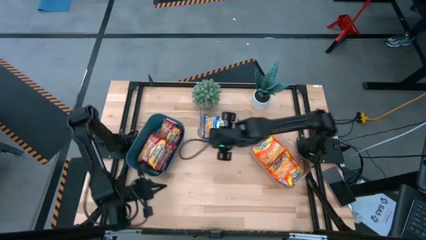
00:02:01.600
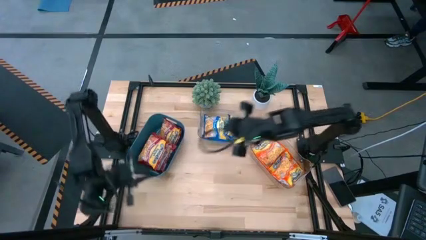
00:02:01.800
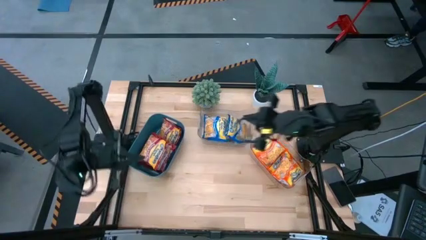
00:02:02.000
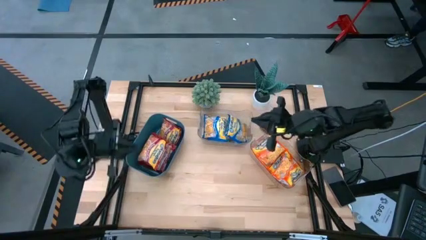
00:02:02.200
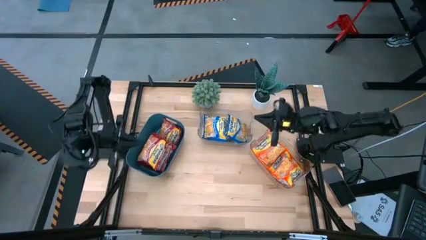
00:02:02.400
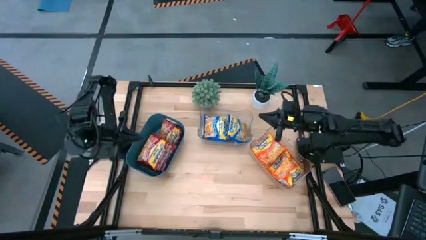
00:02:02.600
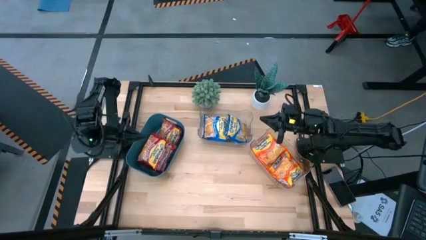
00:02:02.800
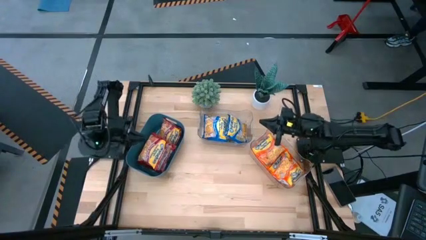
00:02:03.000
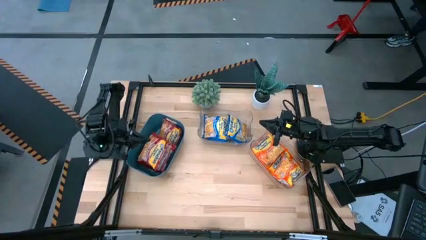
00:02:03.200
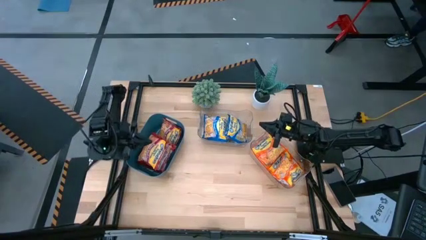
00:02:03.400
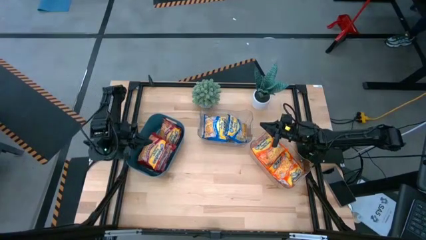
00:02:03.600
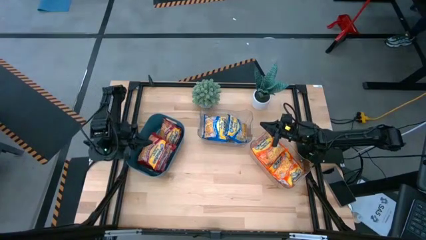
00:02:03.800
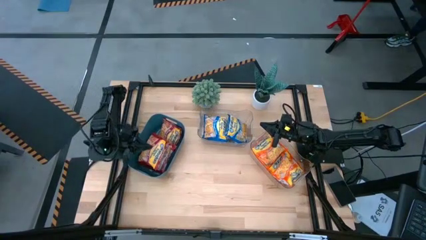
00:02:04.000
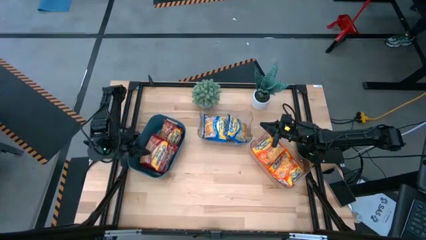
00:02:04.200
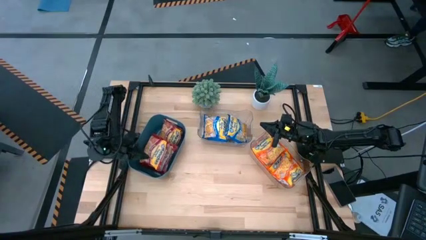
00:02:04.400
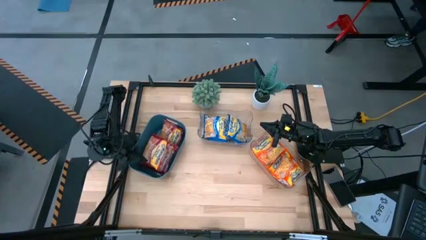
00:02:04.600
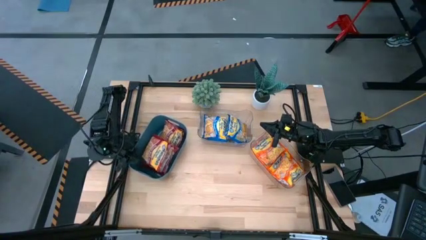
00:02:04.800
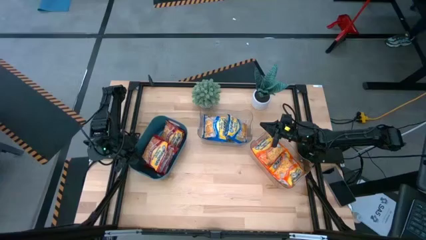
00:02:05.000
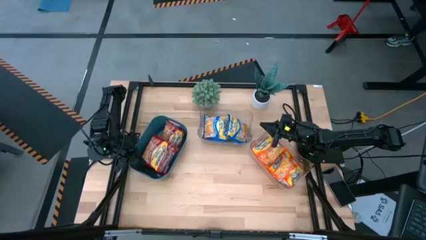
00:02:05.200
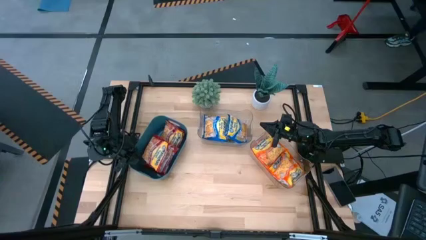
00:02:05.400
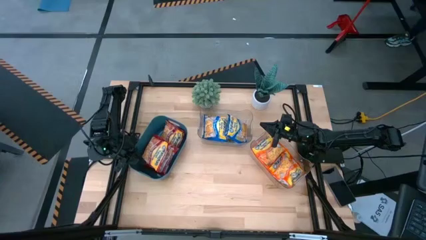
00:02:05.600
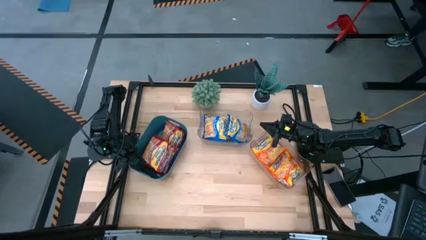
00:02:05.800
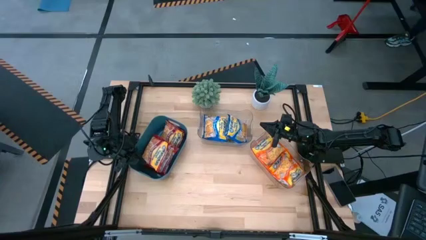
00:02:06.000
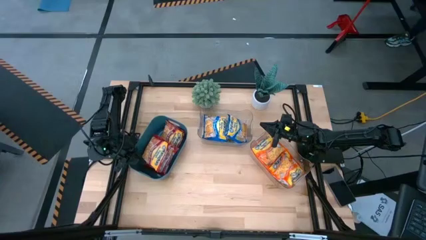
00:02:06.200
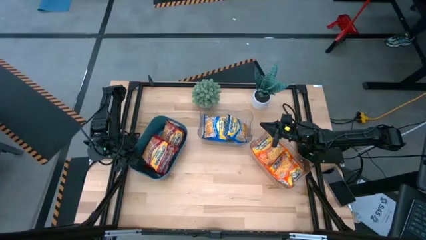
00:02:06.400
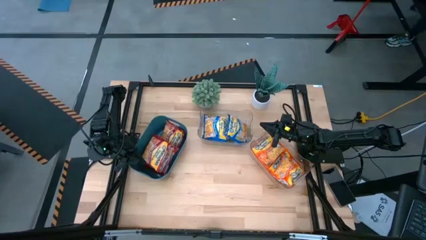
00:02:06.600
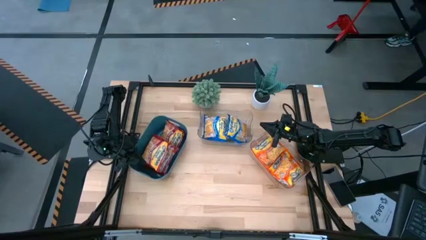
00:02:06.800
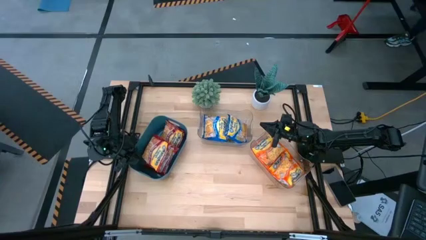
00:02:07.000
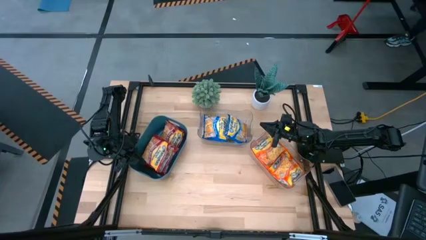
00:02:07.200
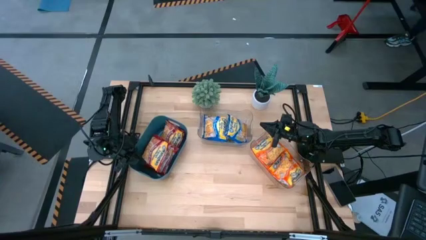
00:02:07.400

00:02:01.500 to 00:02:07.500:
Task: Sort Maruchan noodles
Return to Home Position

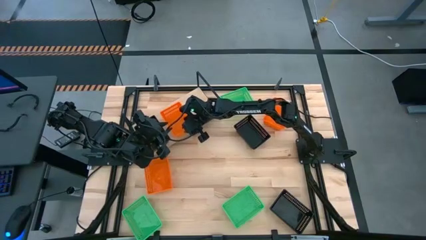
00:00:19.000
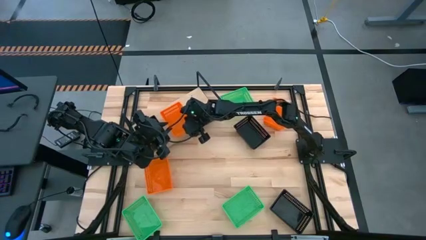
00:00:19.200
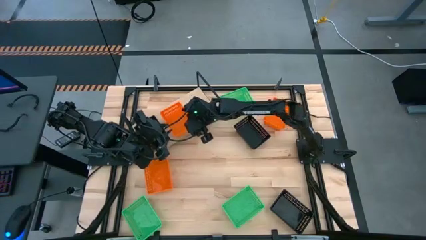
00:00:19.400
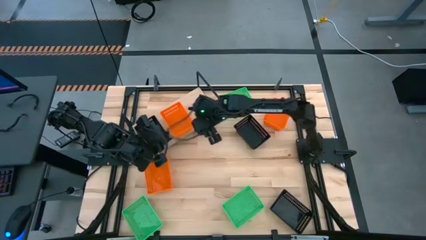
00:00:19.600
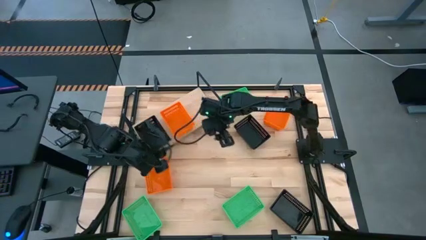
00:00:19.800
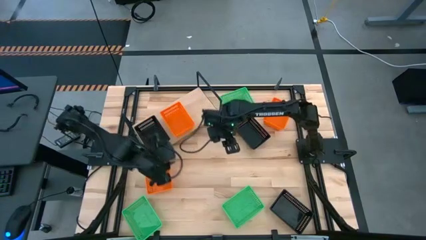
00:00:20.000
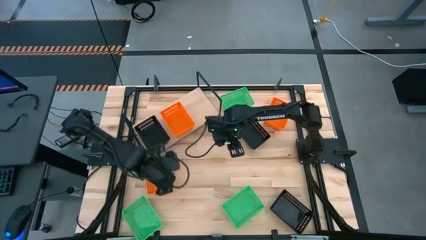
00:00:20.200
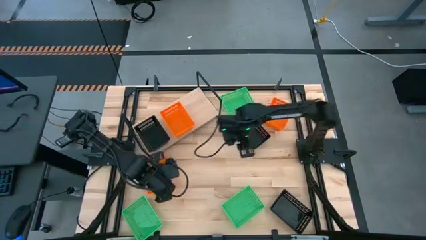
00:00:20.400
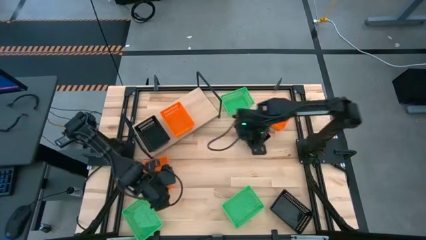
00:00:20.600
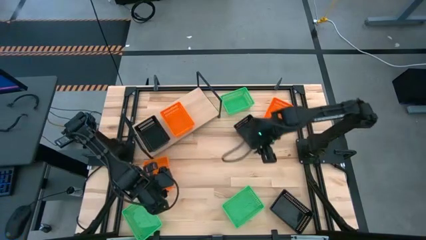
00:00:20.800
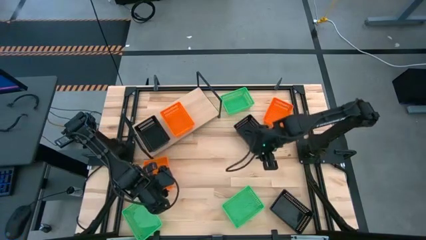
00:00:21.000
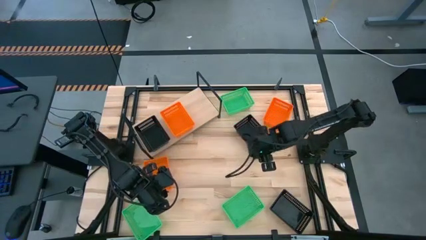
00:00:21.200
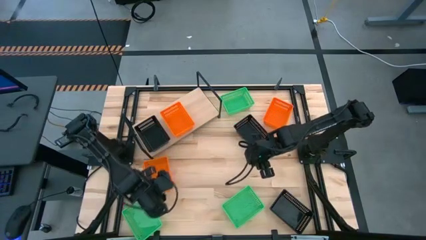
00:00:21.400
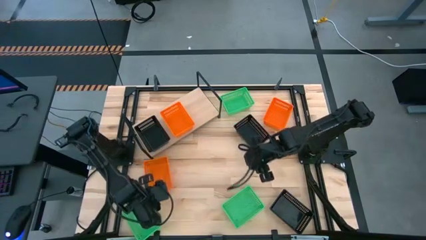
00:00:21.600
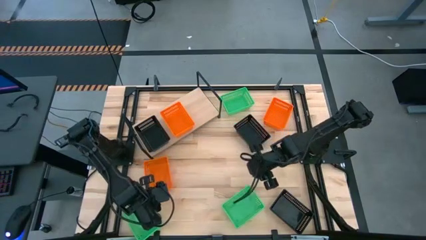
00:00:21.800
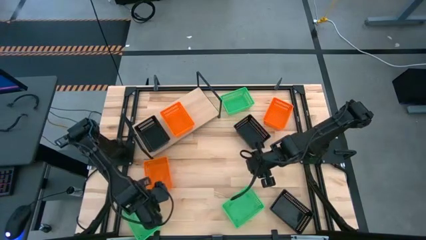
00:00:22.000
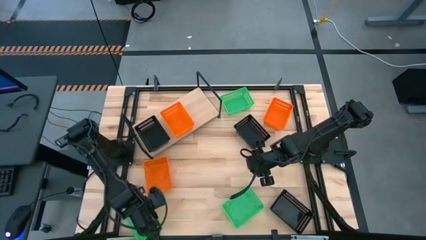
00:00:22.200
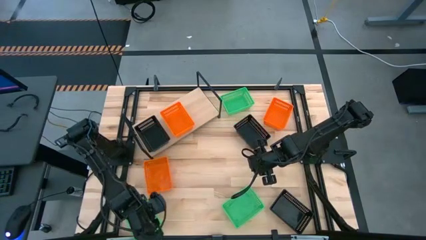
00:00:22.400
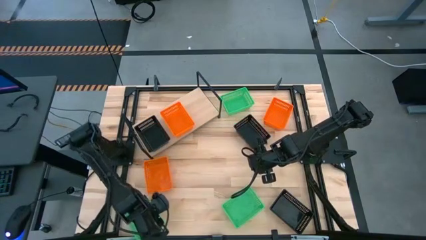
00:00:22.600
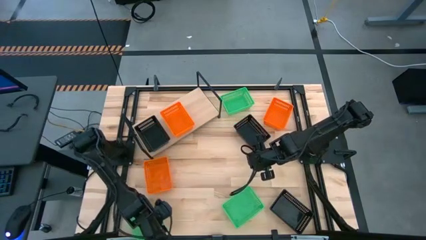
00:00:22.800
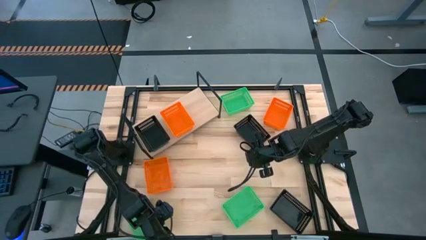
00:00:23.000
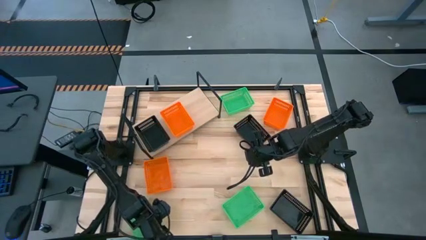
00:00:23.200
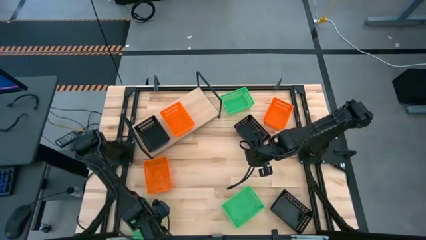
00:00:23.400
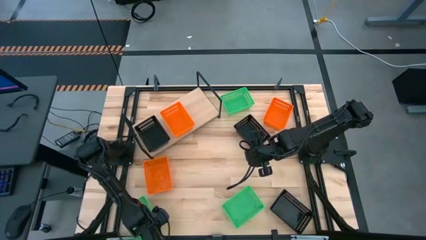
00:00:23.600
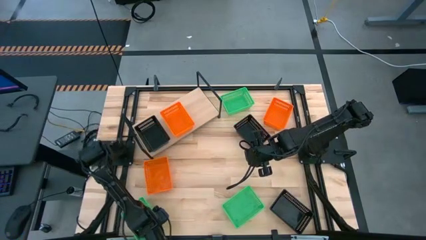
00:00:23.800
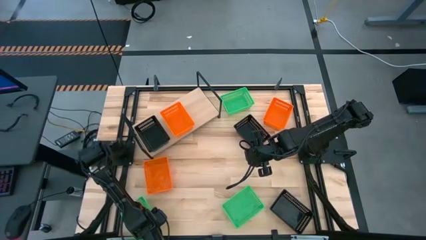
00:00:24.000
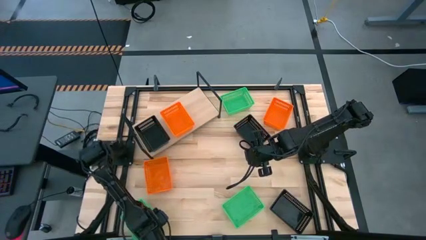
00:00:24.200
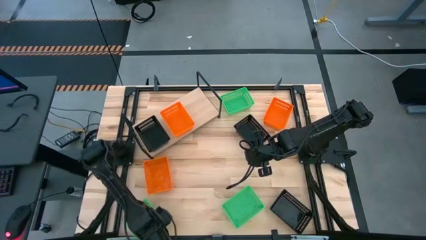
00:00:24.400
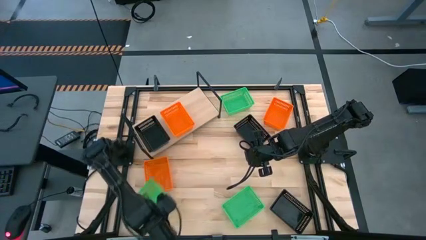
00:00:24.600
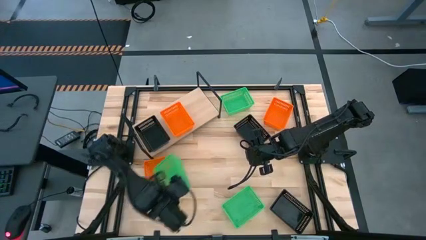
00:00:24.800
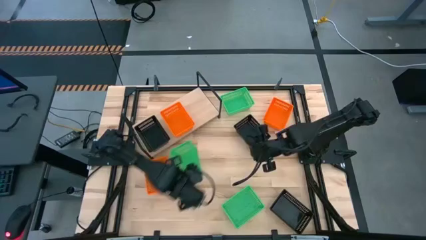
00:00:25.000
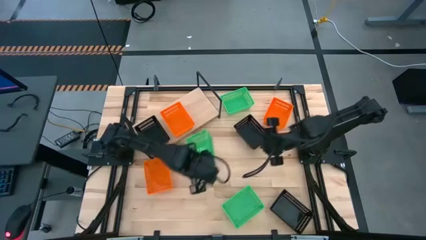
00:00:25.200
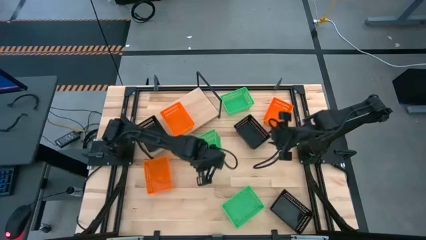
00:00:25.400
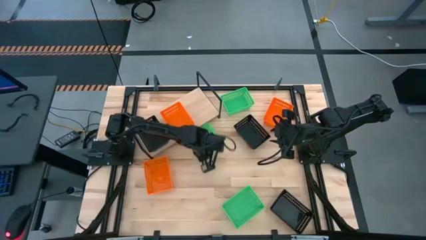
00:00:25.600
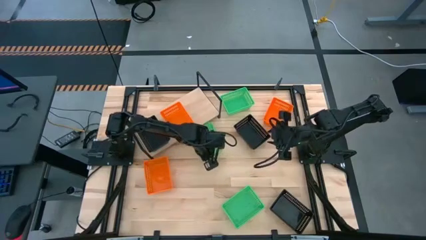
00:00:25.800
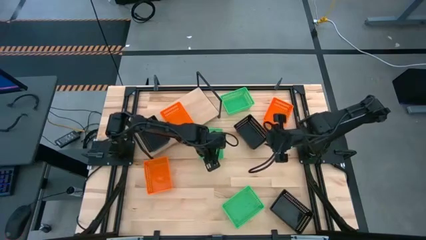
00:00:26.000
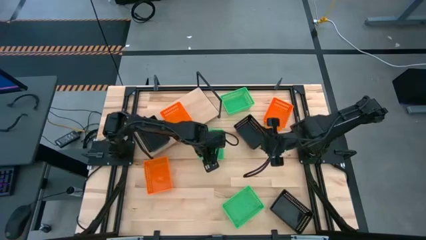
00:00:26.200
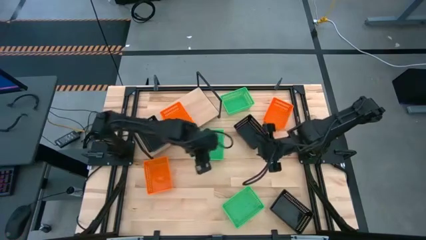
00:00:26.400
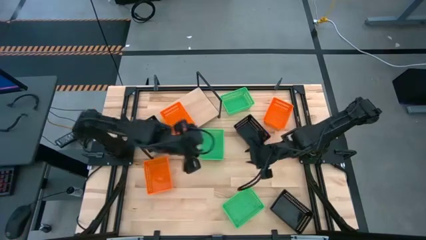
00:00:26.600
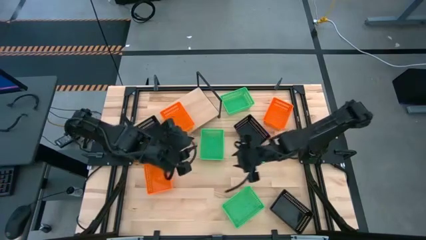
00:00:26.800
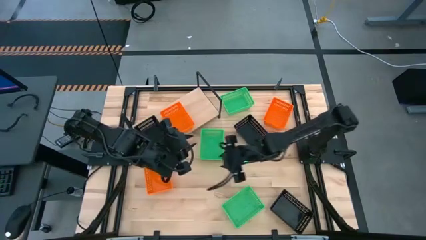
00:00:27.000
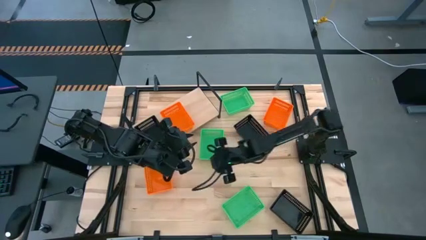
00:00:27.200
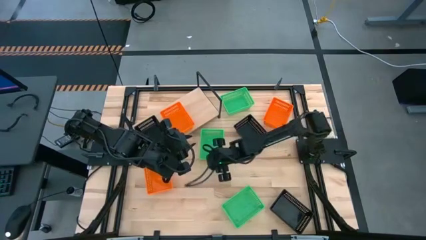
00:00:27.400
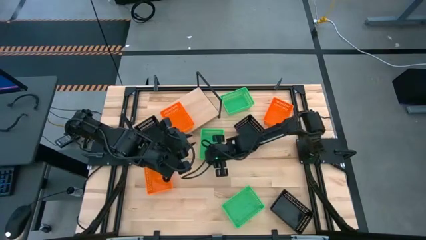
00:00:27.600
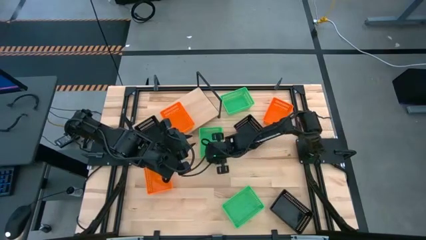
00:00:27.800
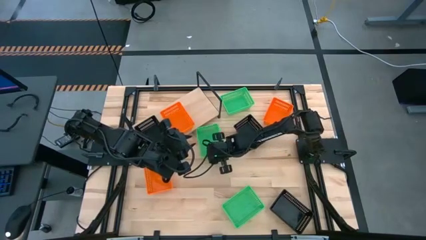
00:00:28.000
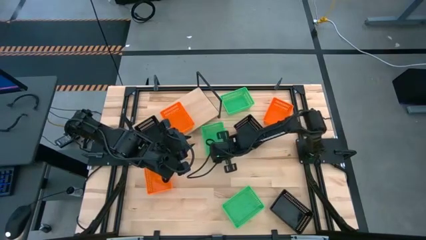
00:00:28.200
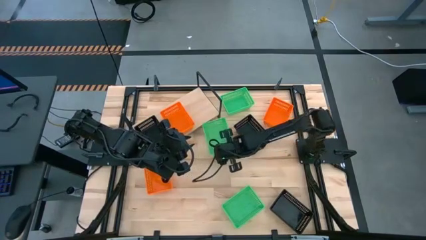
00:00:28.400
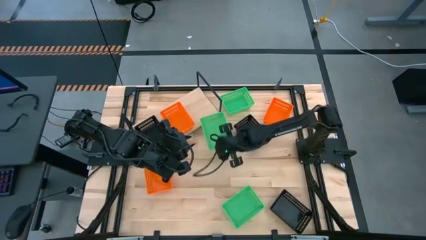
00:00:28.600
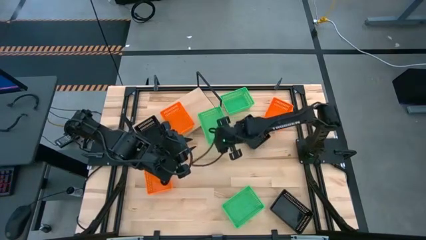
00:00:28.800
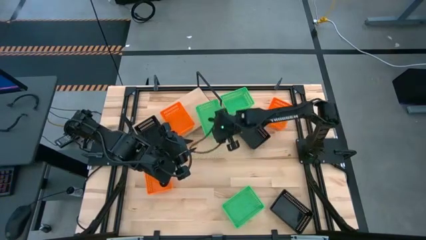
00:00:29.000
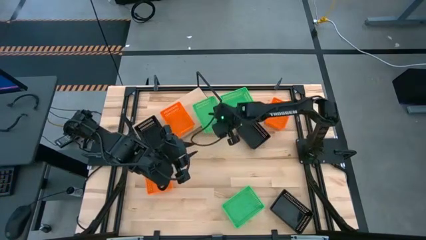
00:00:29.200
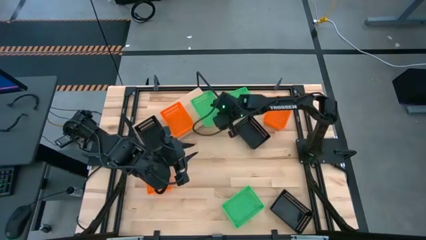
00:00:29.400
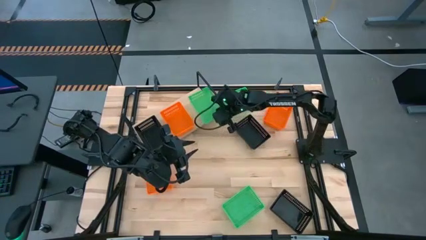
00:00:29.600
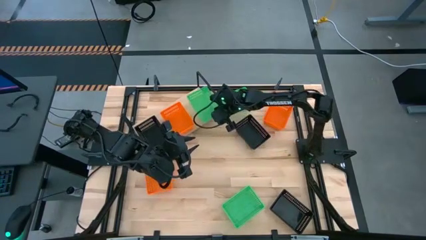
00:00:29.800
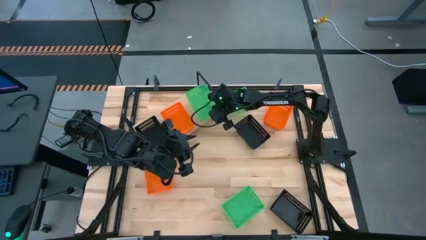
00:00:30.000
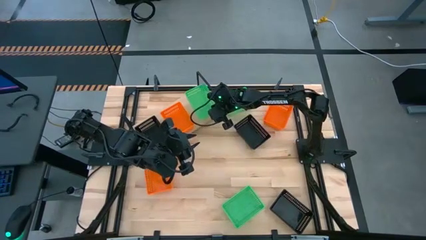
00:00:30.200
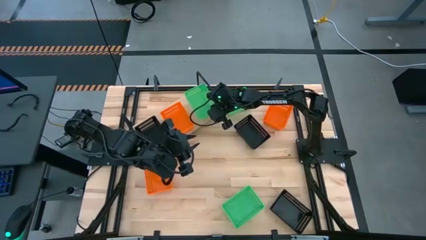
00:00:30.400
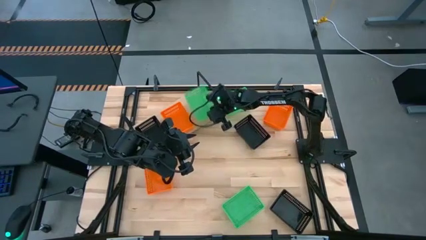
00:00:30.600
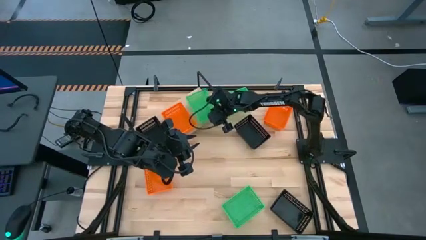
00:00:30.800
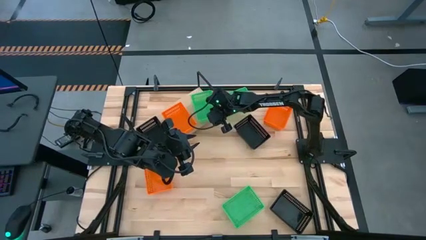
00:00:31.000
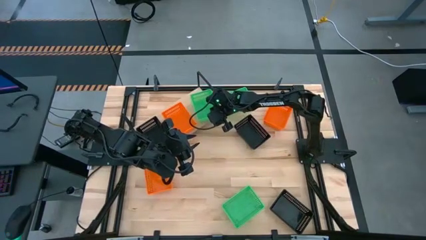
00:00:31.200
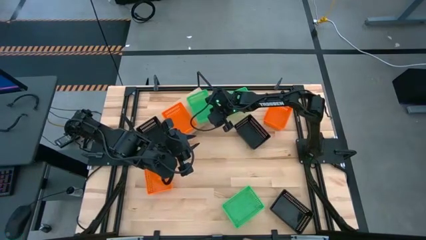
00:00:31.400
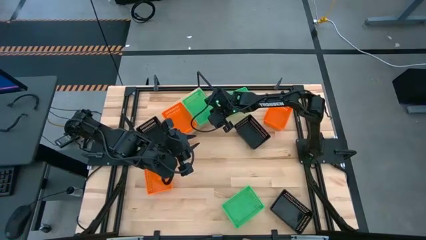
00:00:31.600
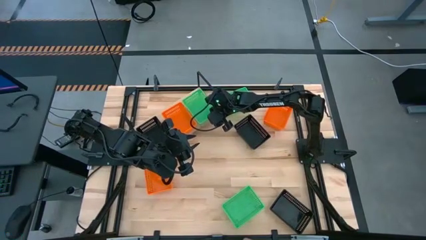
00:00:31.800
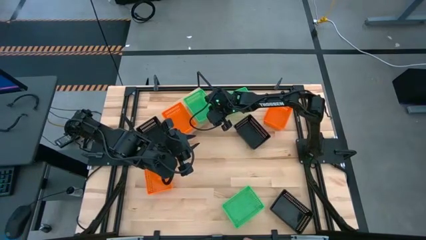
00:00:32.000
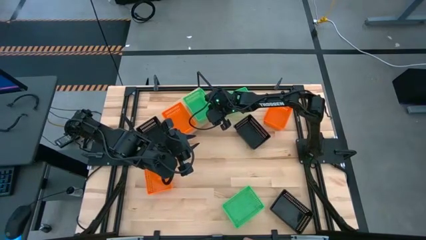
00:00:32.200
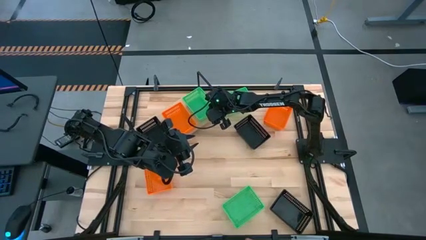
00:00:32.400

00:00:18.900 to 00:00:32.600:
Task: Stack baskets on shelf by color
Put the bottom left green bin on the shelf
